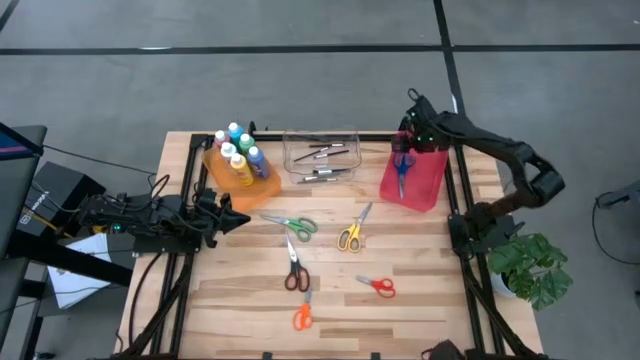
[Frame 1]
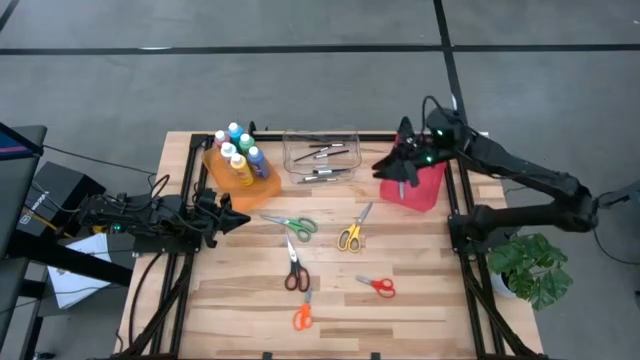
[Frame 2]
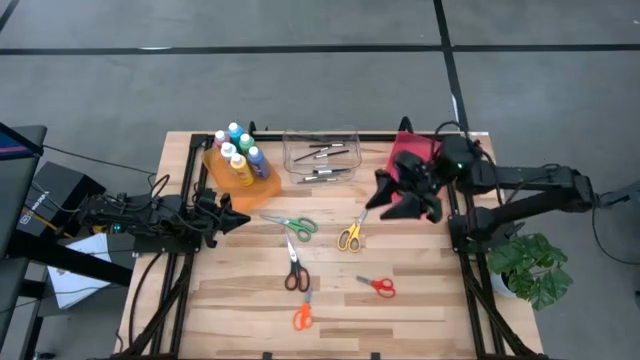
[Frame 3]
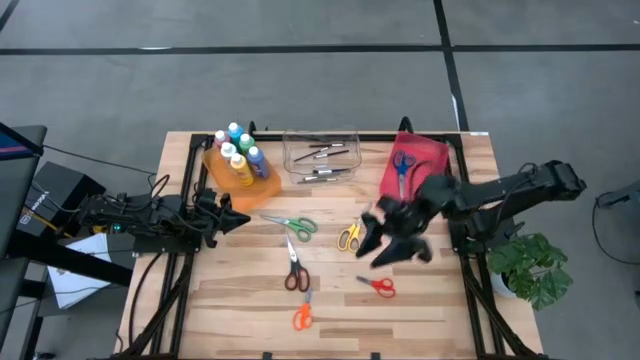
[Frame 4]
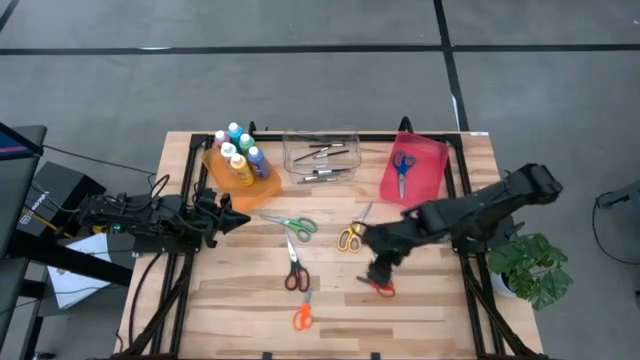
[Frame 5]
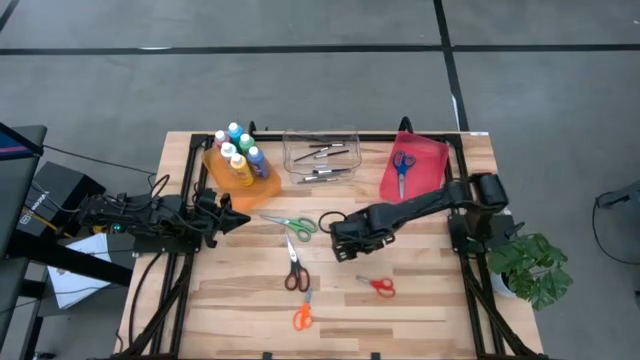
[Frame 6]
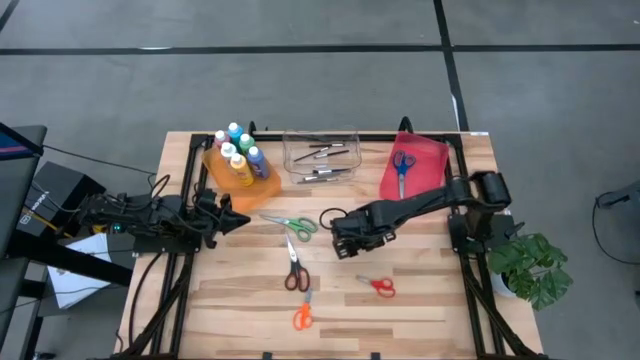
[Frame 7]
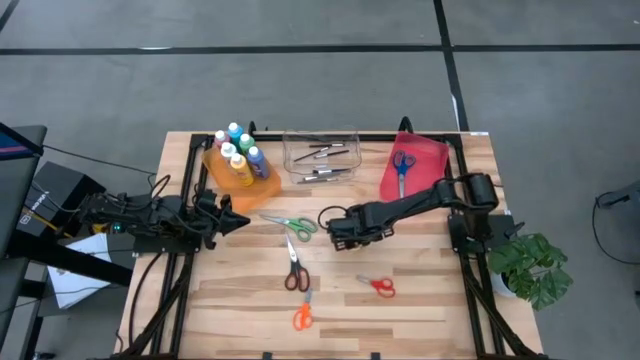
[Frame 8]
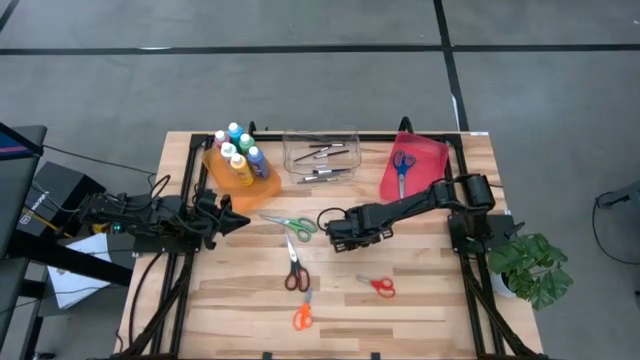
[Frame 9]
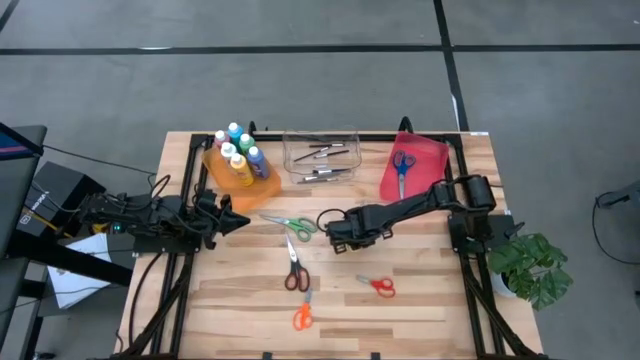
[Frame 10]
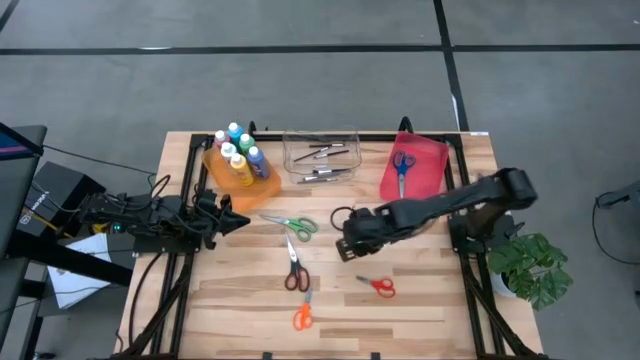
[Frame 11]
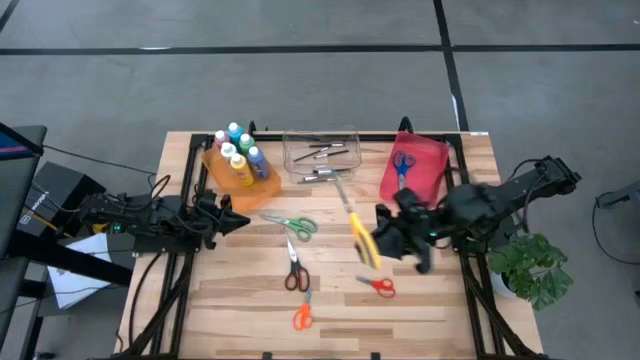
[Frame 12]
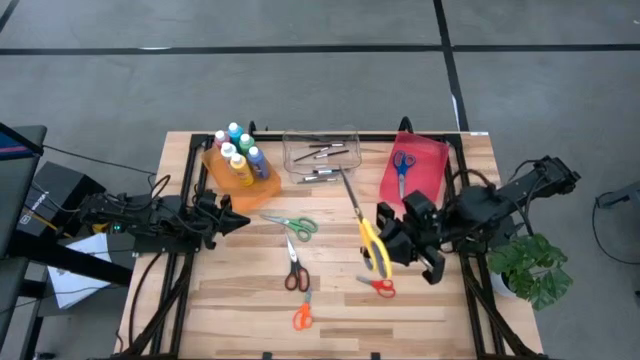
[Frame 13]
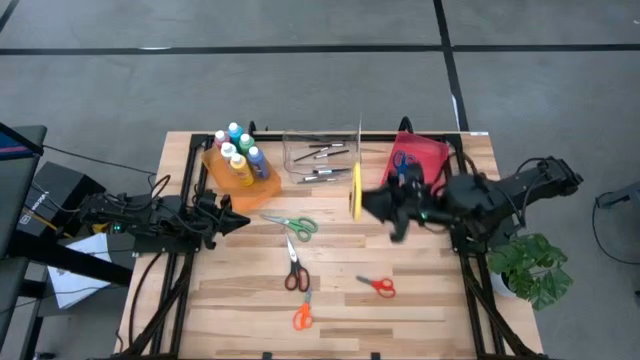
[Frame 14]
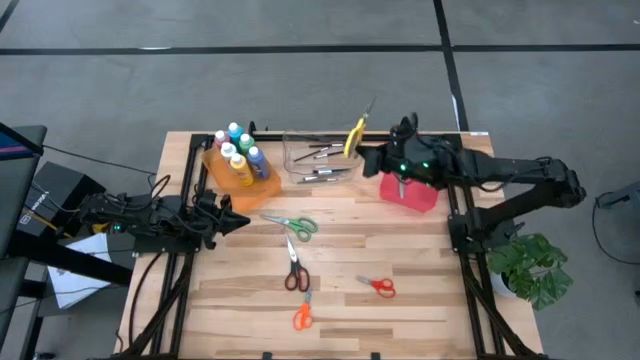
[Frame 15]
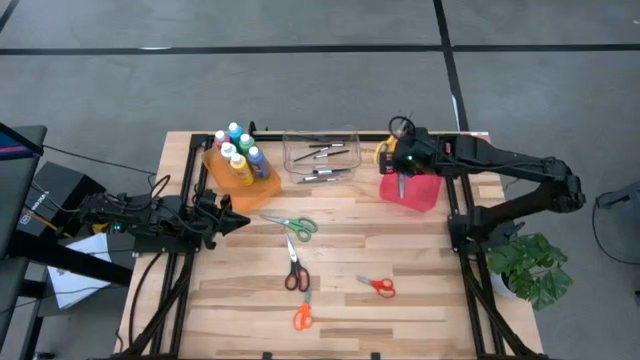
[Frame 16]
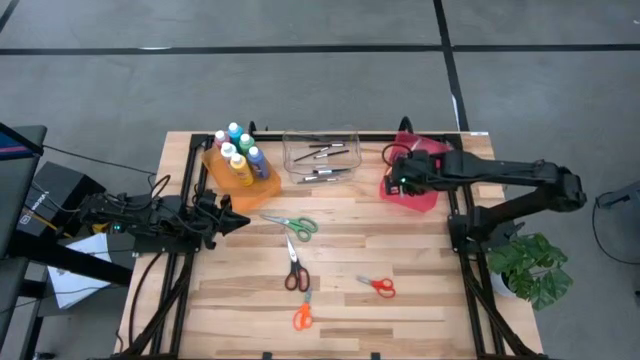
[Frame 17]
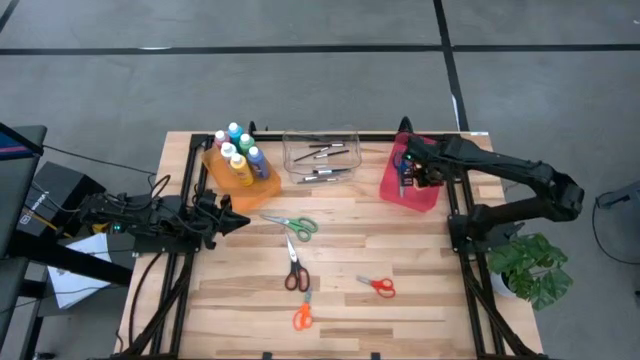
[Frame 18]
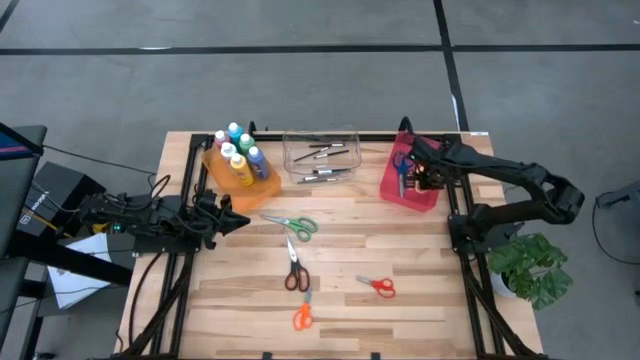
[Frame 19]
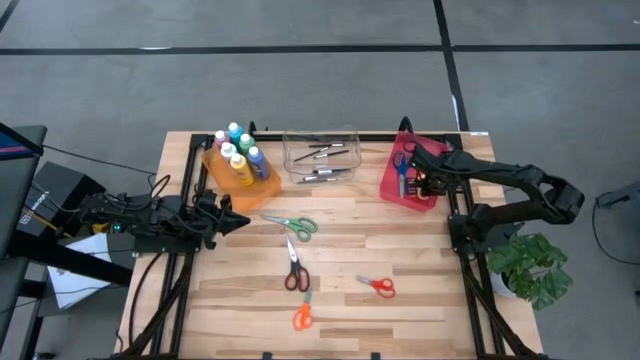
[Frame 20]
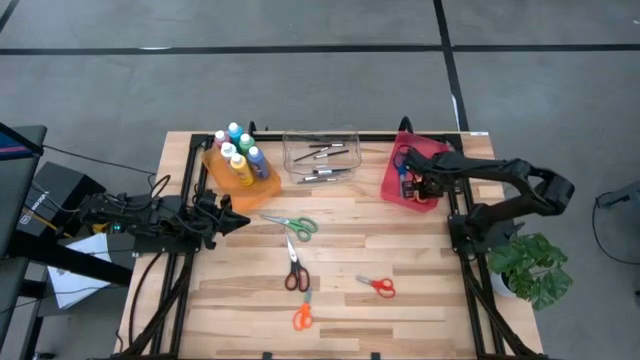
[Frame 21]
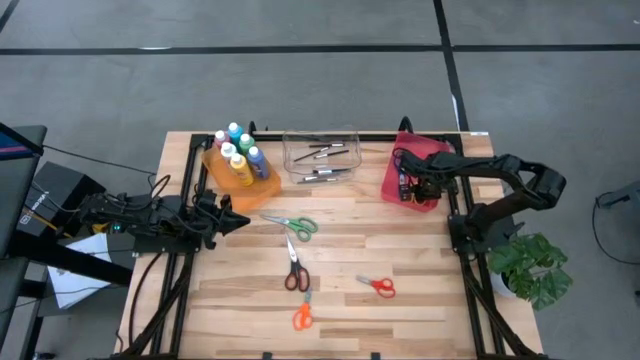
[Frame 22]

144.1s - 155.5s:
Task: Pick & Place Paint Supplies
Put the yellow scissor into the red bin

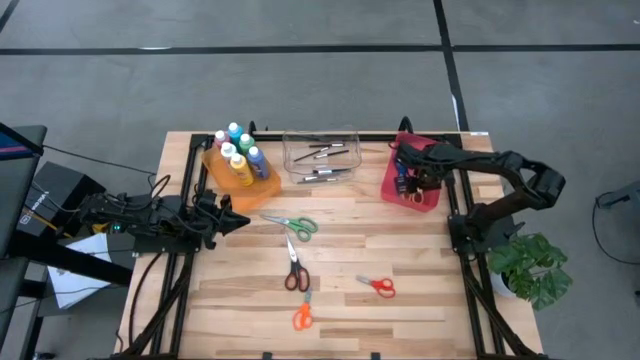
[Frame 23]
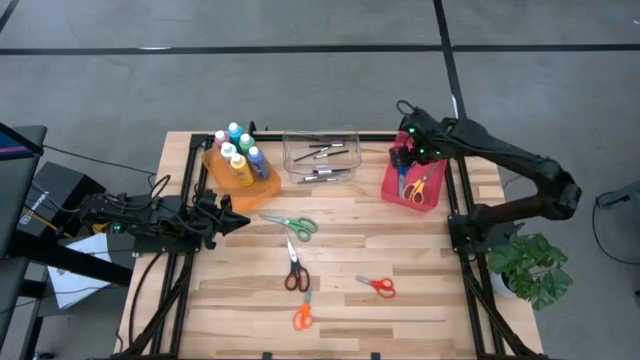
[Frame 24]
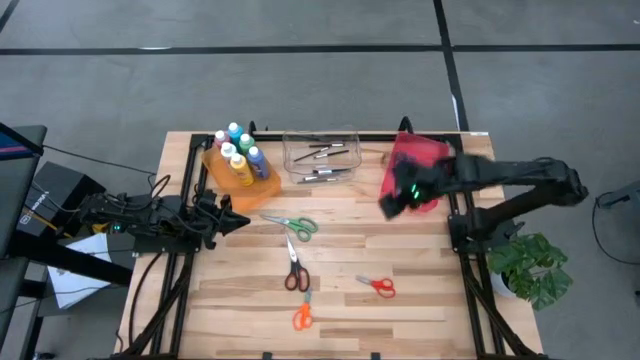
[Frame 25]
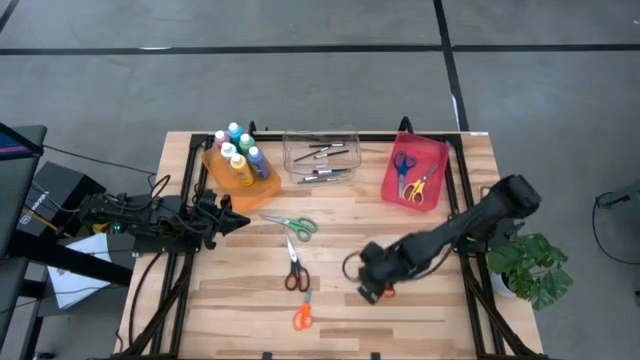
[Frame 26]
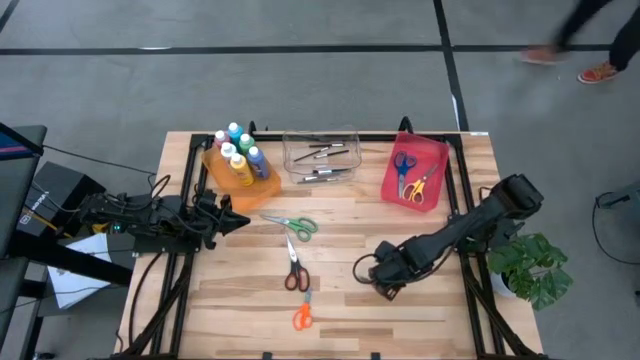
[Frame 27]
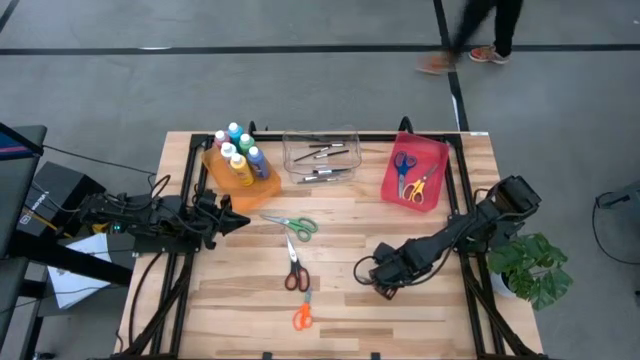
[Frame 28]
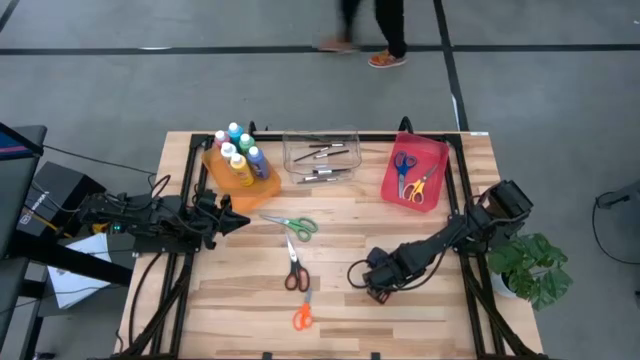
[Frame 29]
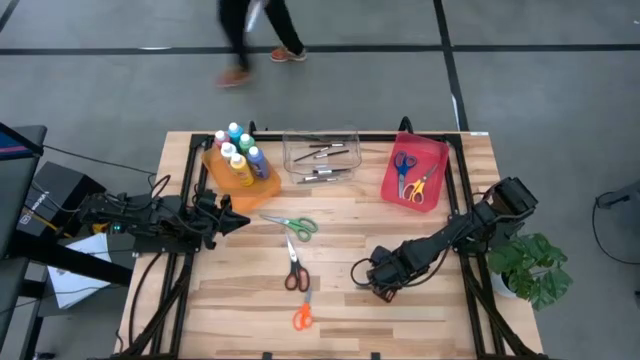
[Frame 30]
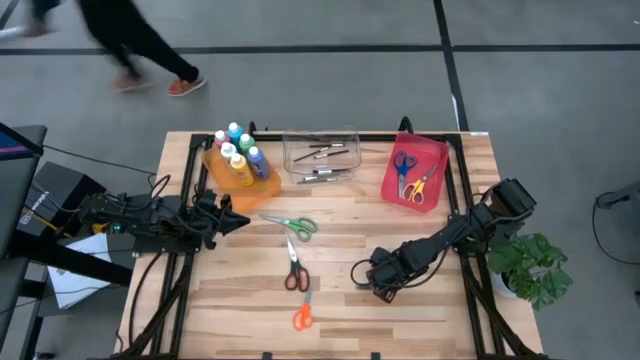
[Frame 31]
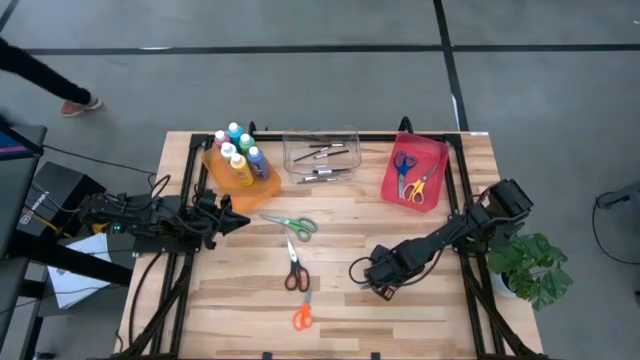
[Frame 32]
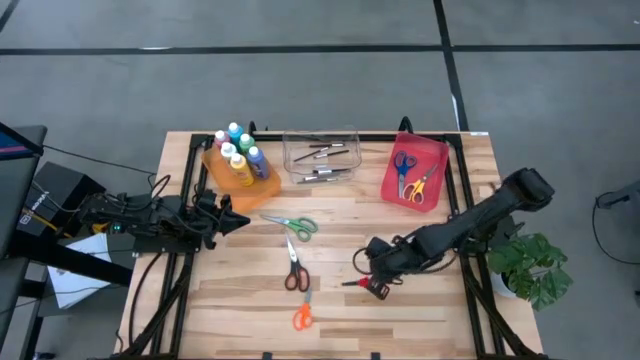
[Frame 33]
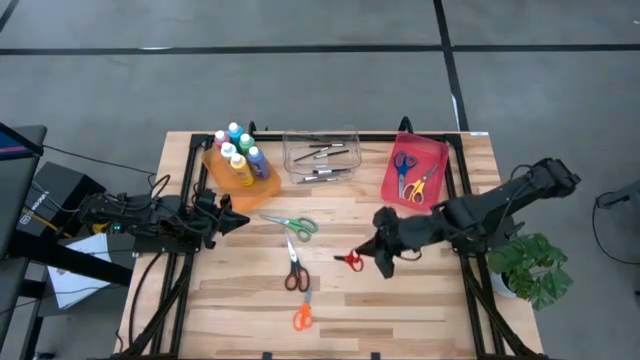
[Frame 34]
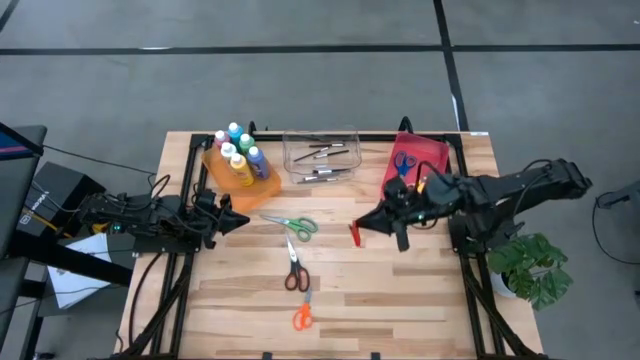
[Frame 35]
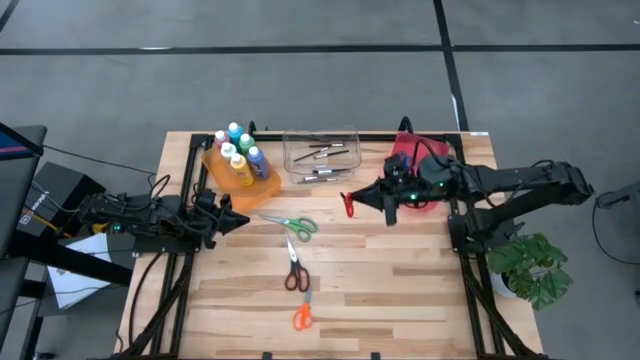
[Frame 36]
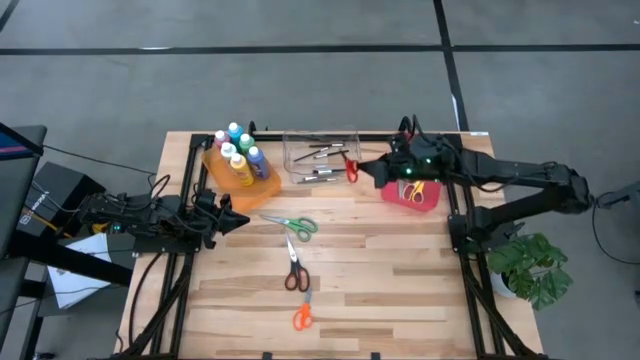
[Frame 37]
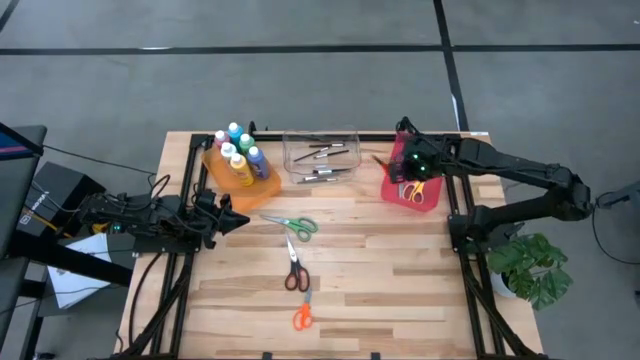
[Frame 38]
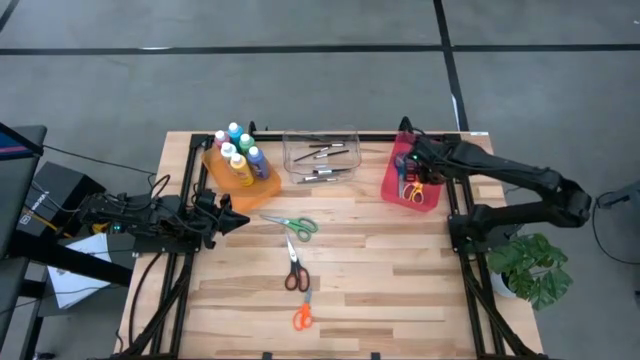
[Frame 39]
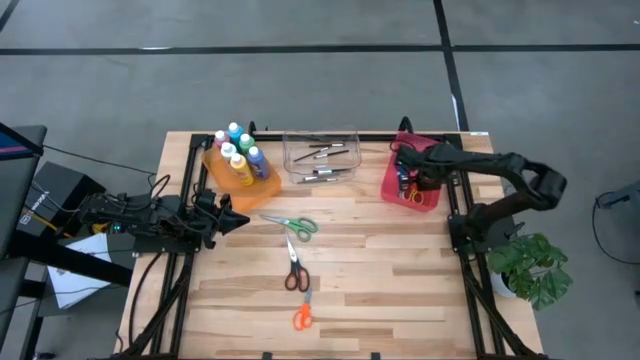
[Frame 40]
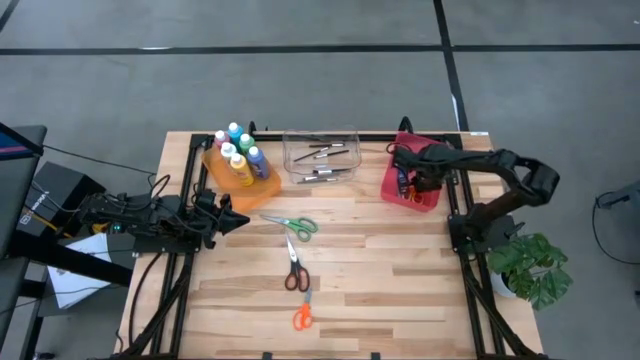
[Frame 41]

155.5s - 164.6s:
Put the red scissor into the red bin
